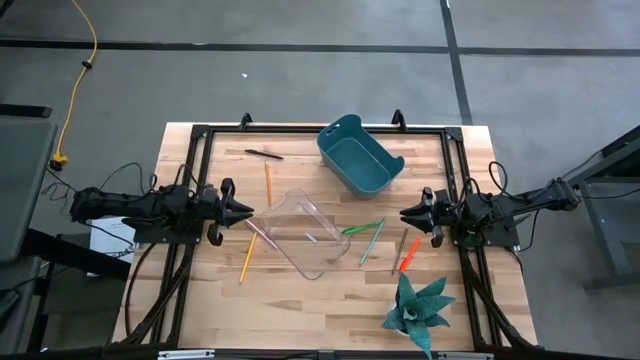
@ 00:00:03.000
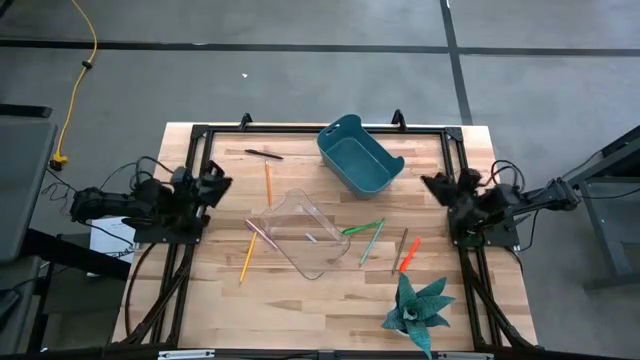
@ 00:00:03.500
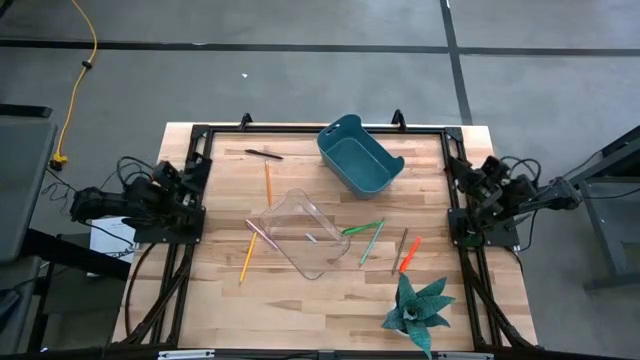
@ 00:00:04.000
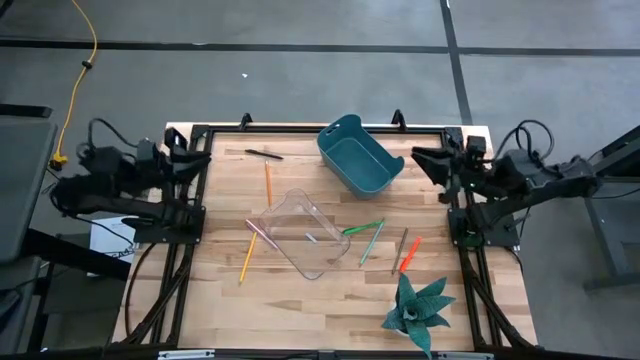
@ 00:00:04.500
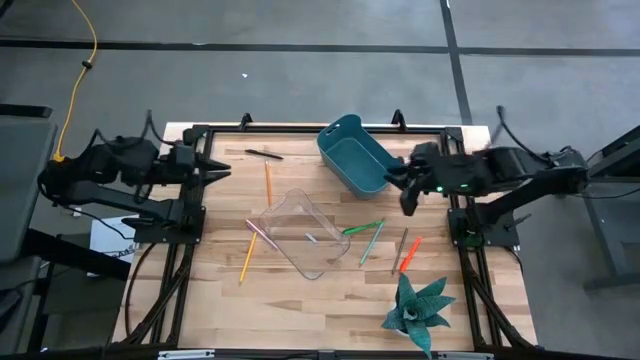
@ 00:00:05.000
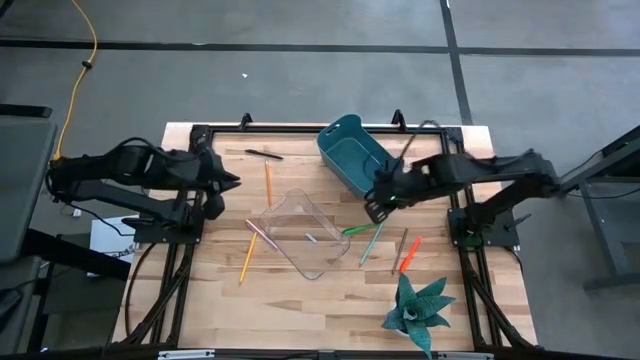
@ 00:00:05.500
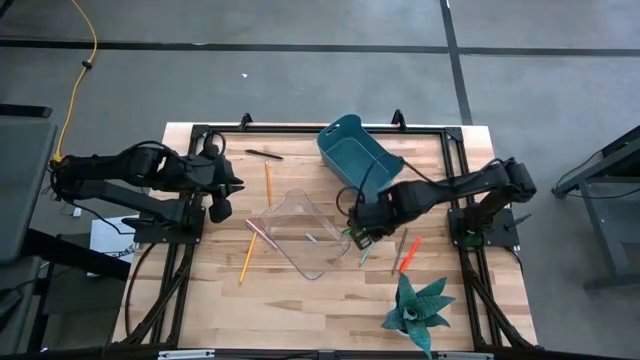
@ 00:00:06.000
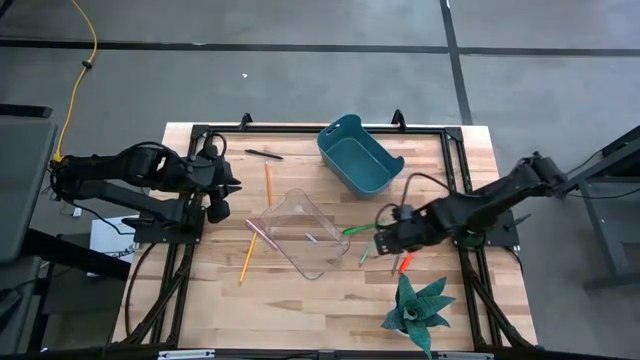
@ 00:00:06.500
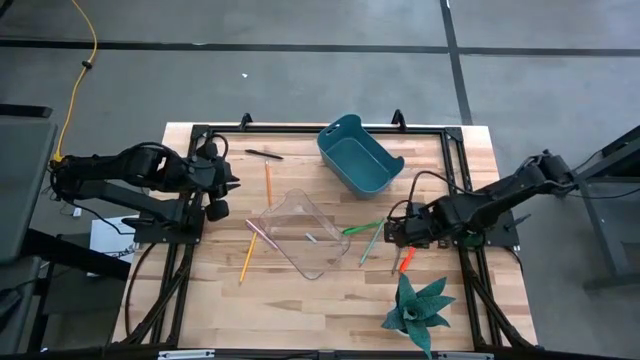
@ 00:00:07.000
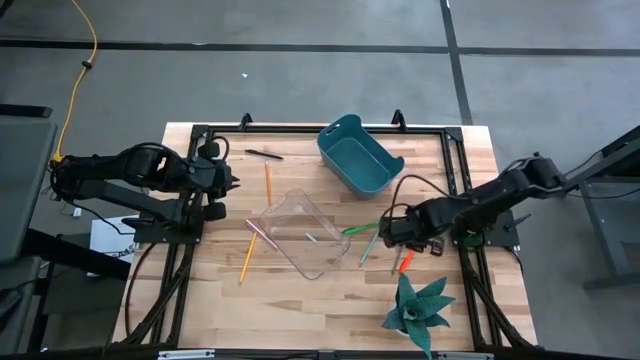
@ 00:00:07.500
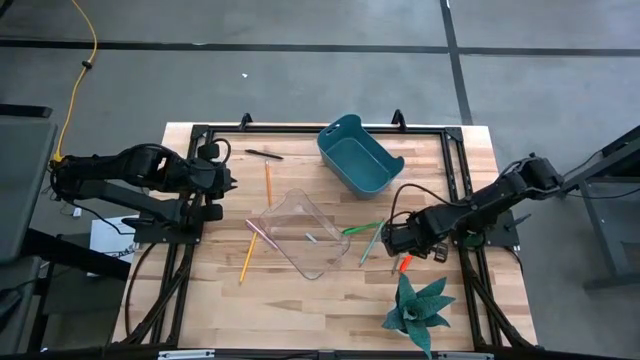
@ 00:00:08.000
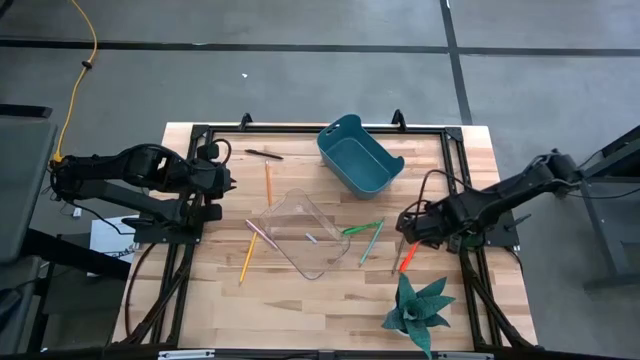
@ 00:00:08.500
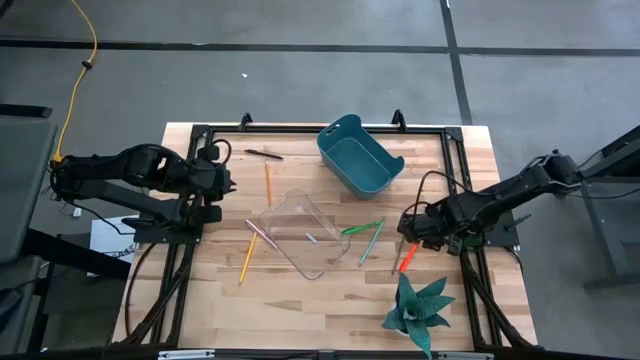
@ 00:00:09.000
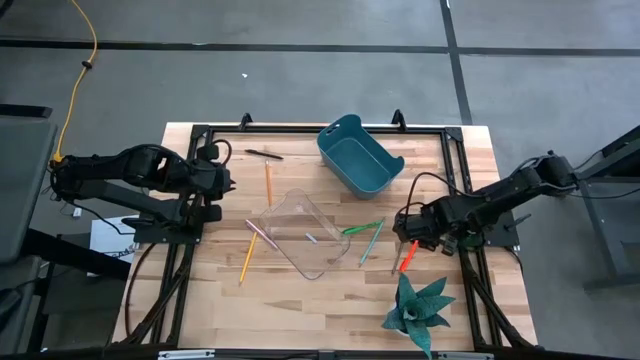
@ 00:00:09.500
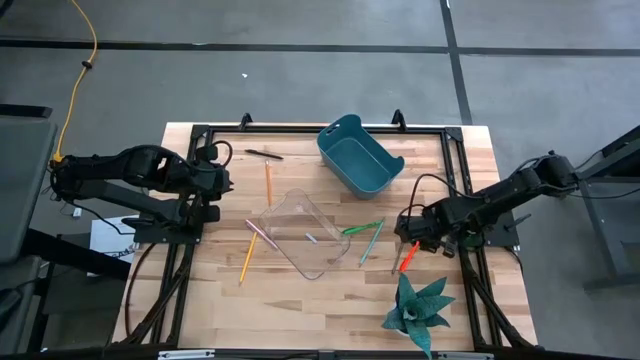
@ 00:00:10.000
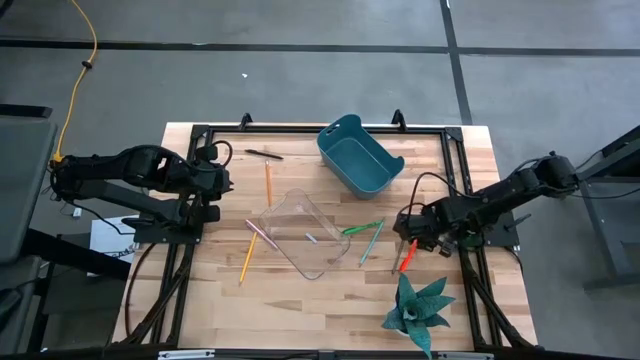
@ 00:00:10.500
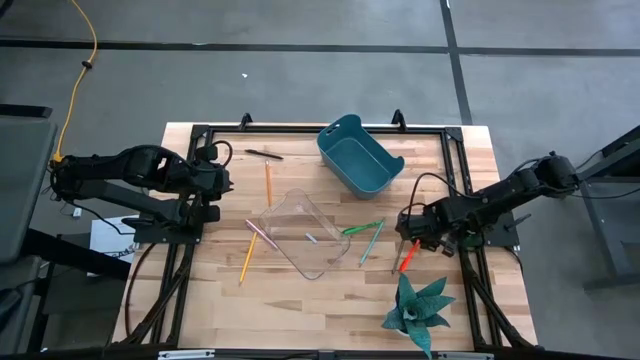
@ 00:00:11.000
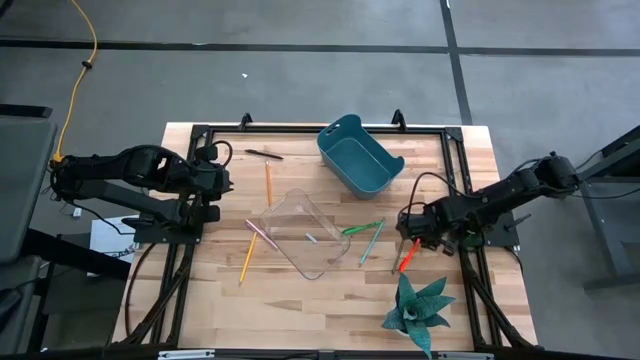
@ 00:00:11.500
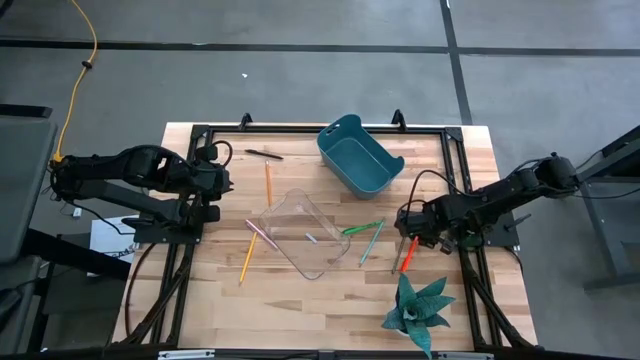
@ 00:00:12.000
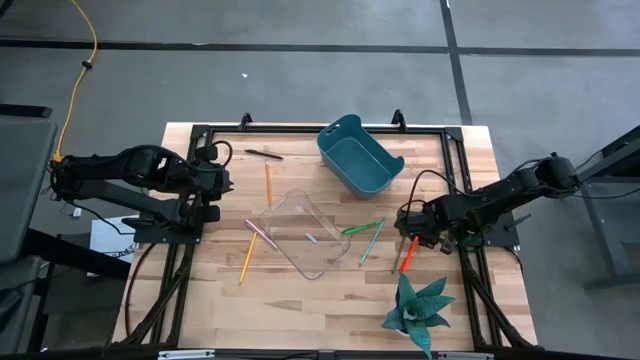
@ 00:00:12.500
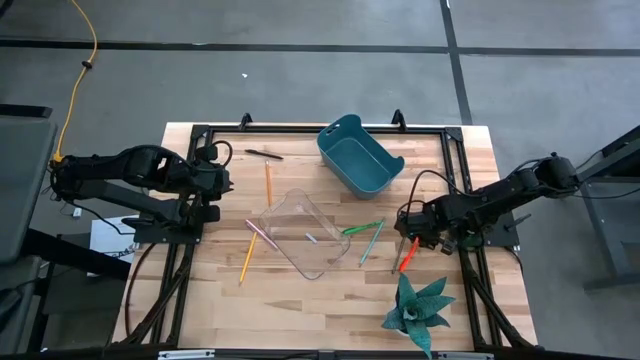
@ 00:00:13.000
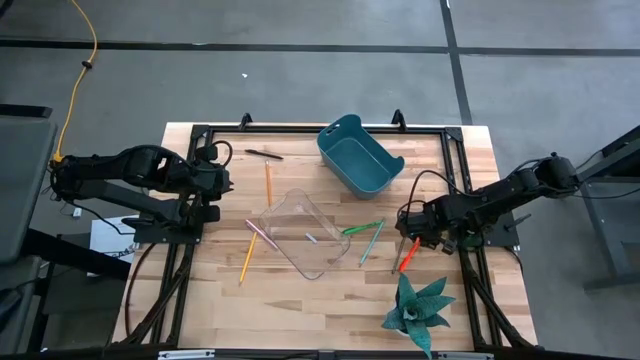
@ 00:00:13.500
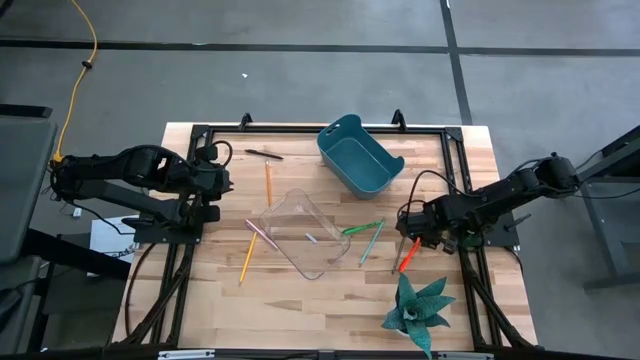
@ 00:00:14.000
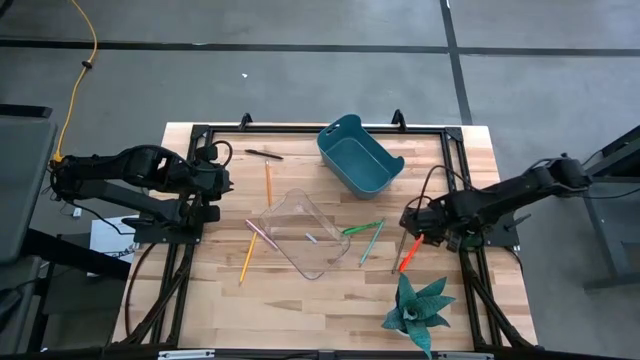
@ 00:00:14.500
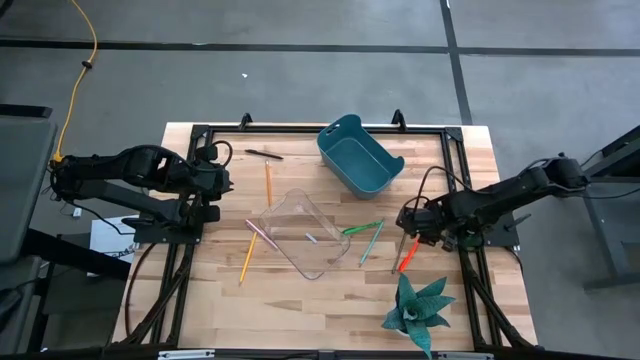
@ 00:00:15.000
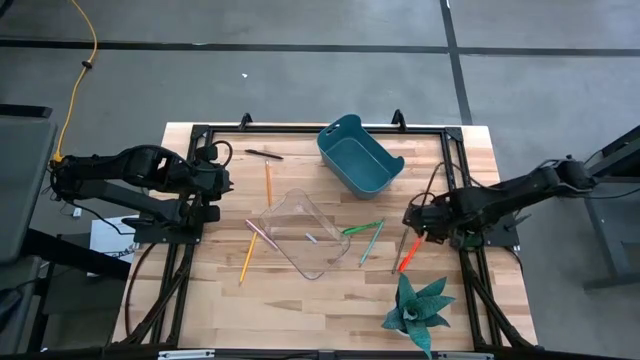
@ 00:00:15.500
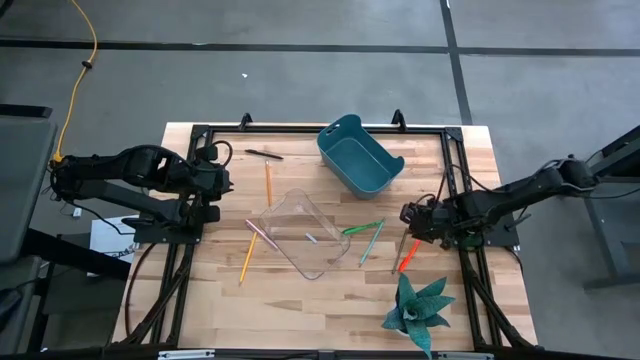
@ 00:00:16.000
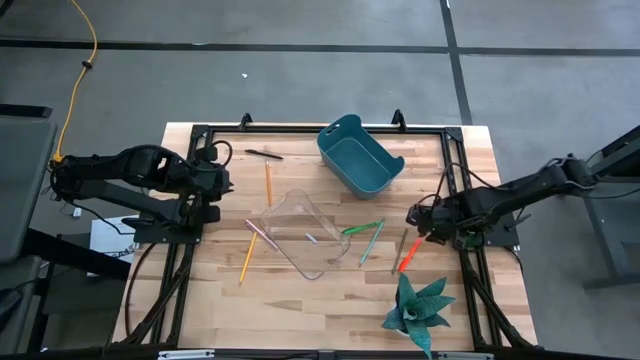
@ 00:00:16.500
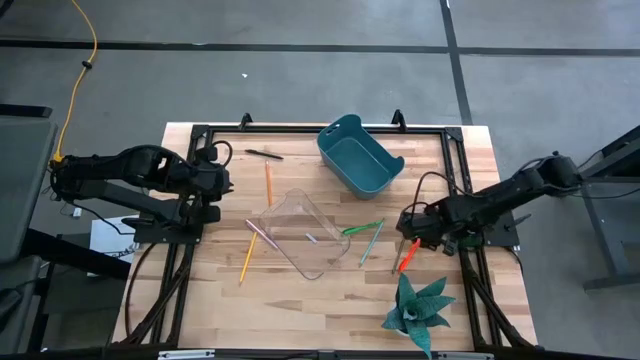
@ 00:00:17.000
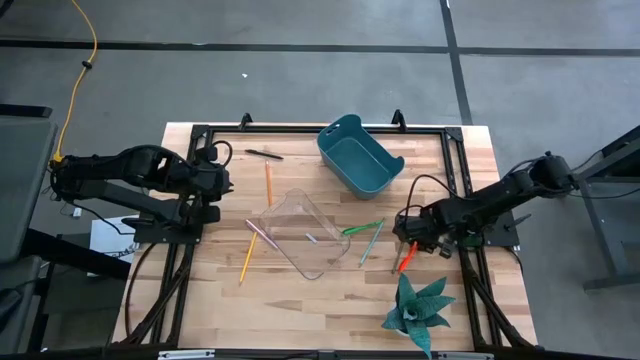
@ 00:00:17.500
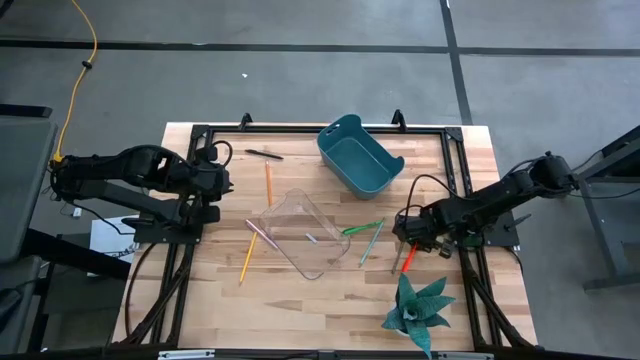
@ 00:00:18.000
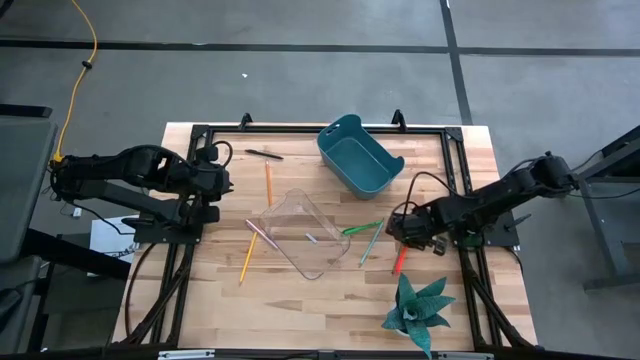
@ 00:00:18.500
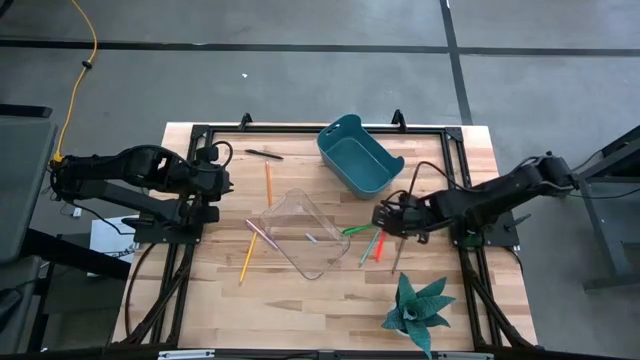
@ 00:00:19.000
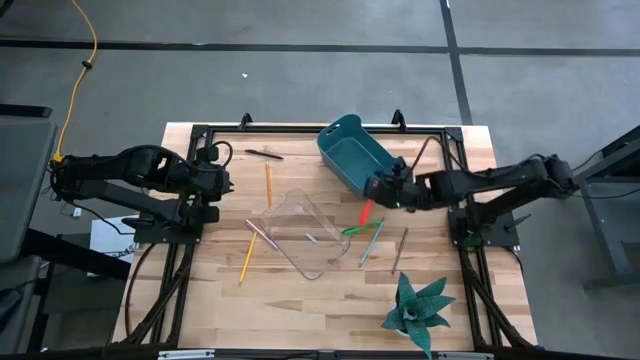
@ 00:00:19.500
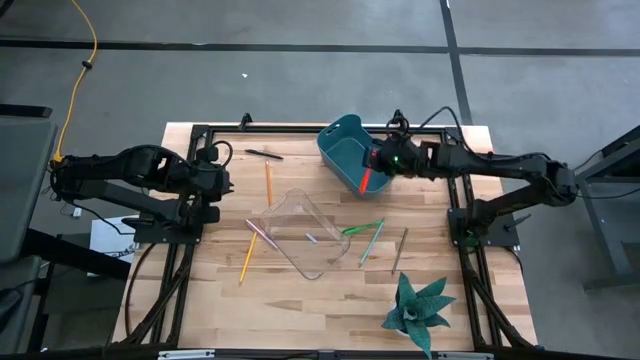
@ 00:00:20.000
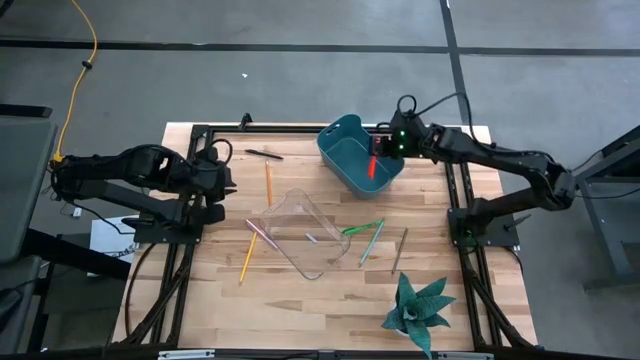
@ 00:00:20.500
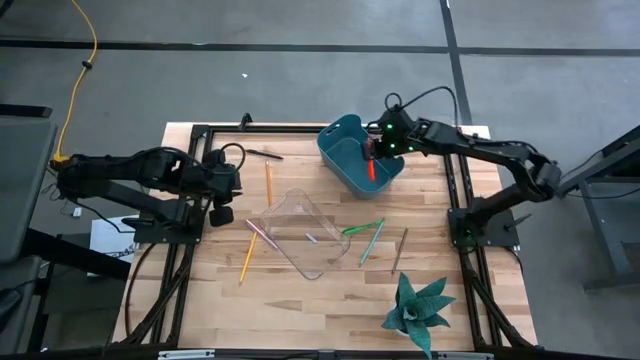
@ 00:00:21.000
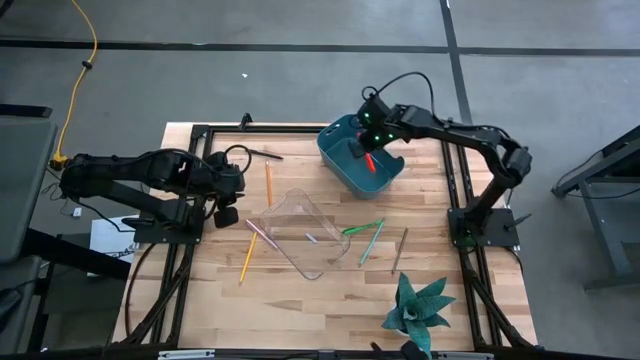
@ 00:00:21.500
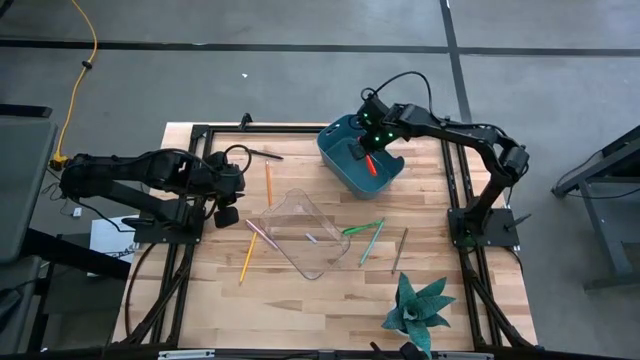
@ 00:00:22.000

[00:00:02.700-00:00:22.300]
Task: Sort pens & pencils
Put the orange pen into the blue bin
